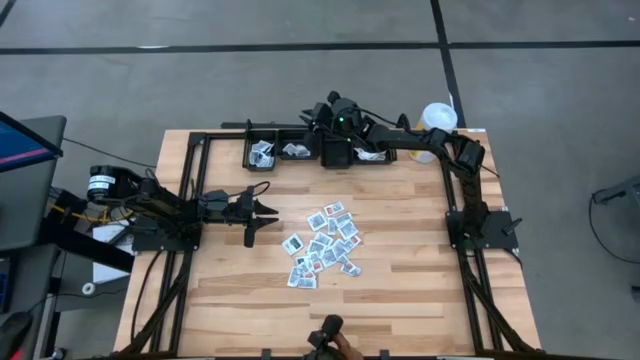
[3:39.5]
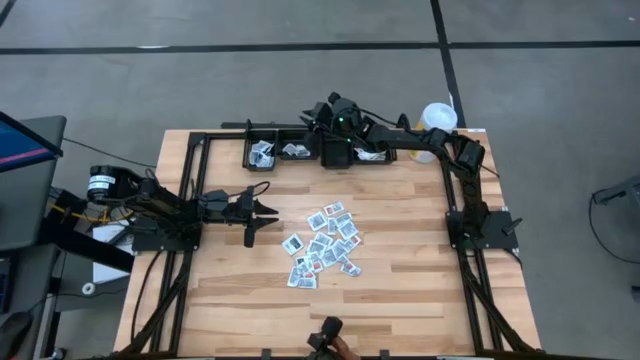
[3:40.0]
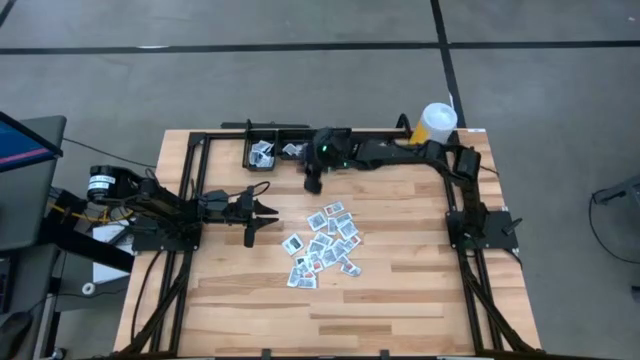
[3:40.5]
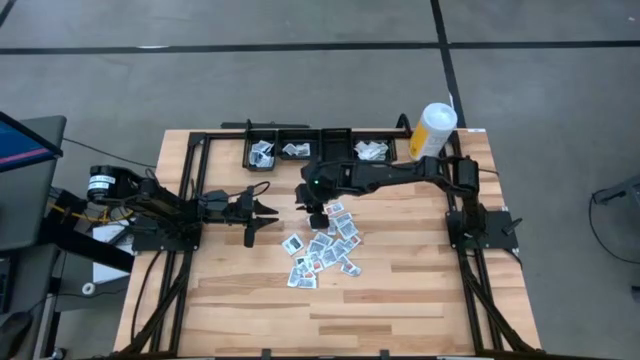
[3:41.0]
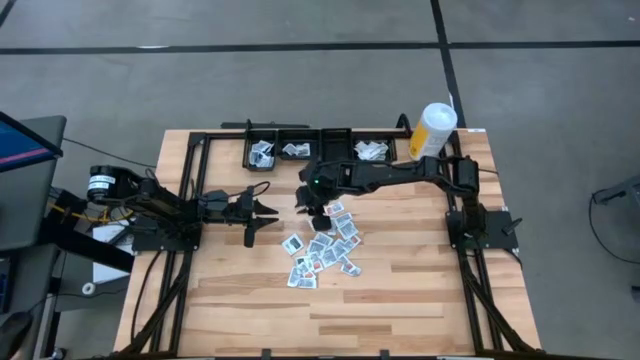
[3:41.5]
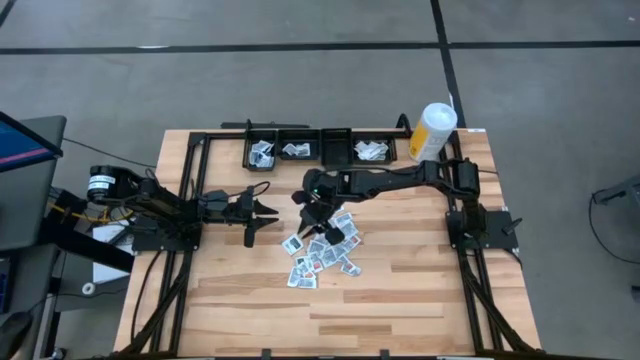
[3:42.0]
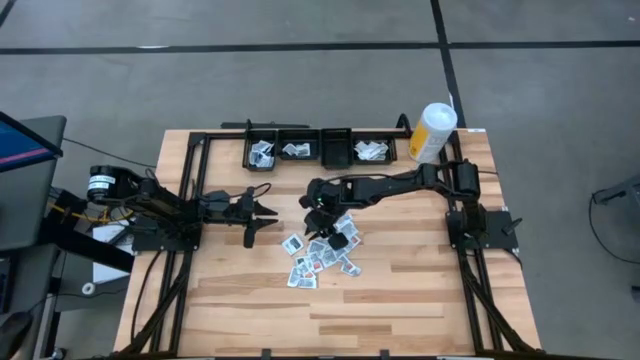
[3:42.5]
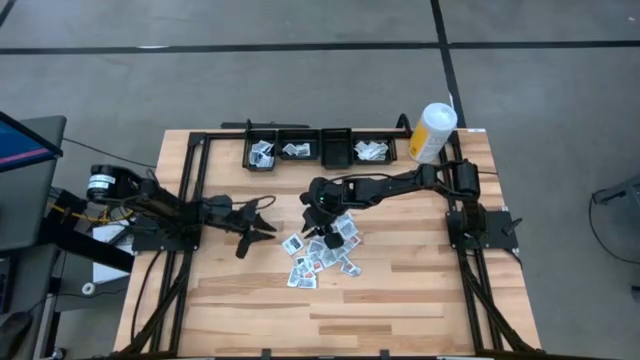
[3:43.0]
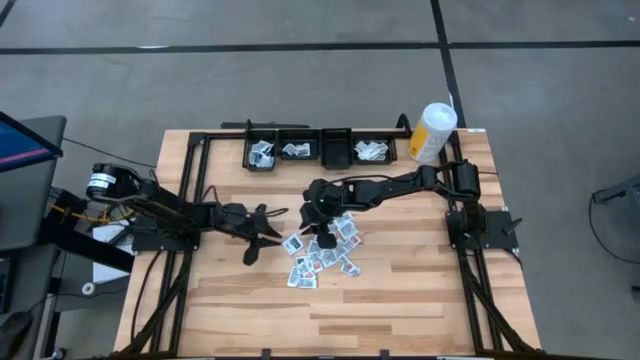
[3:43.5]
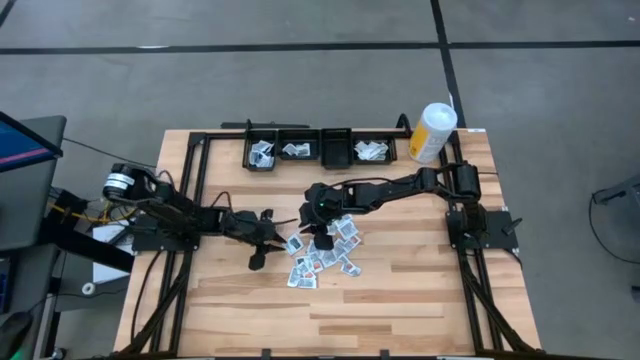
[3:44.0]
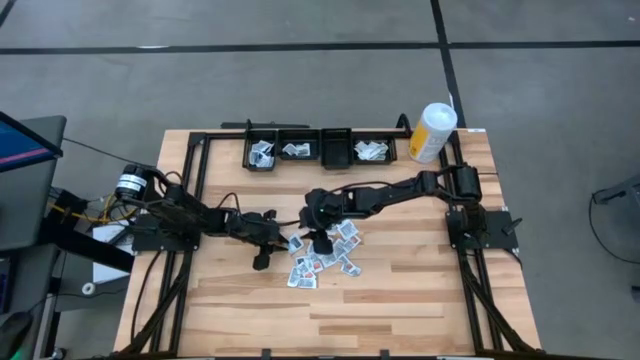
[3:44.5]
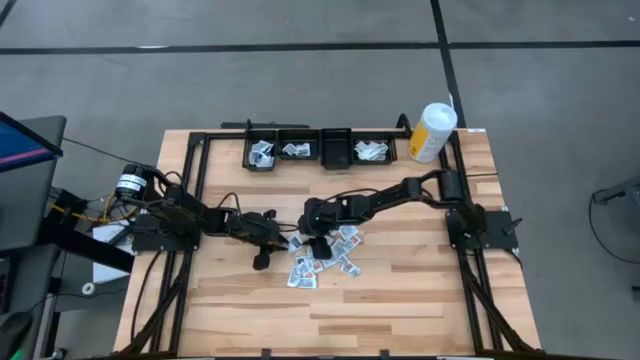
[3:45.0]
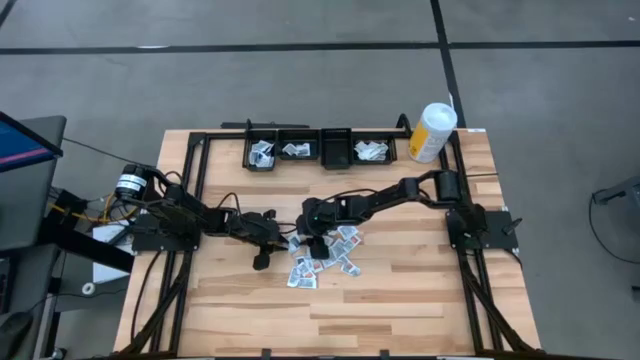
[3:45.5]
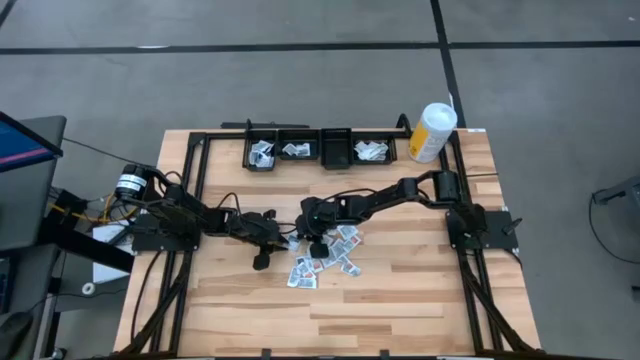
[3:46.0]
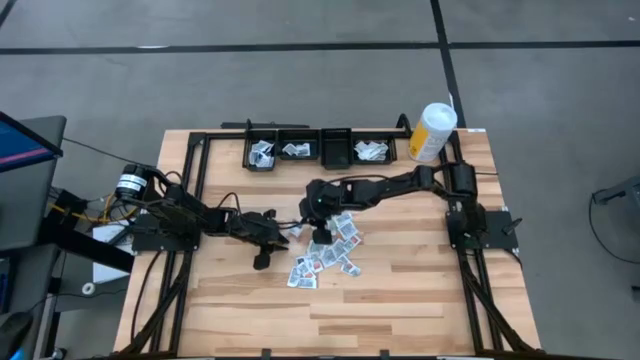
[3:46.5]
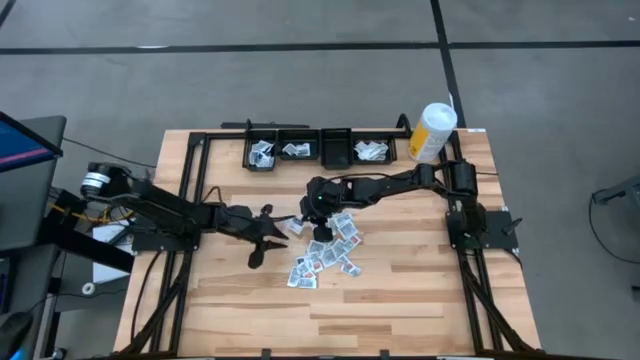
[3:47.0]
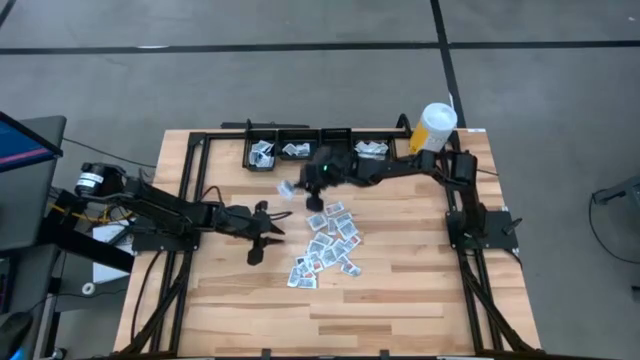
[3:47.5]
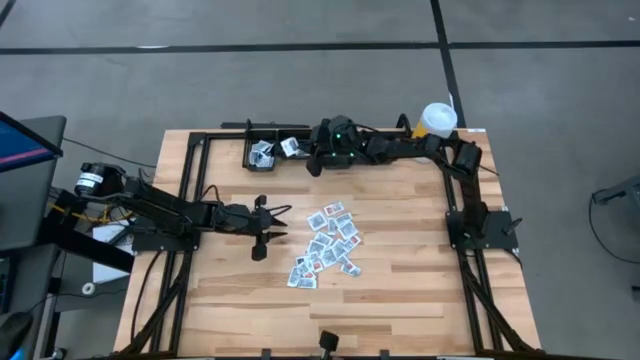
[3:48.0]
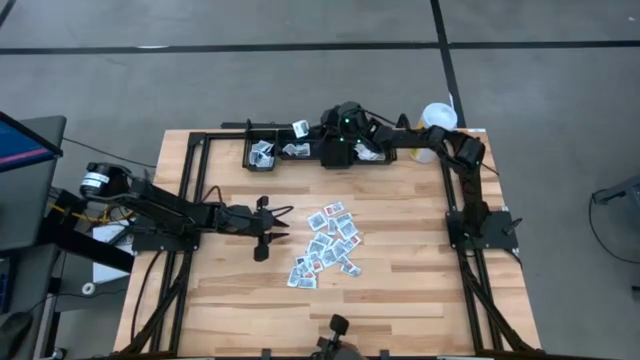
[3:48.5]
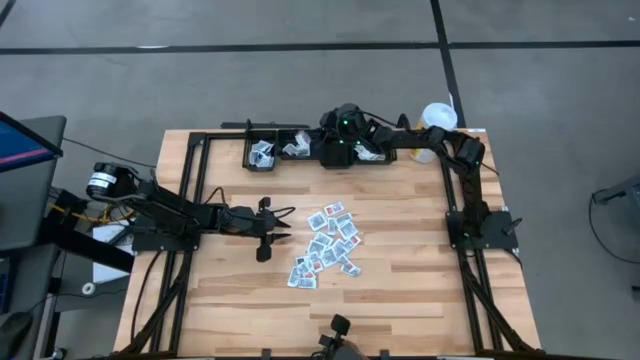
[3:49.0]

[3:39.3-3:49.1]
Task: Pick & Place First Aid Supplies
Put the black towelette pack into the middle left black bin

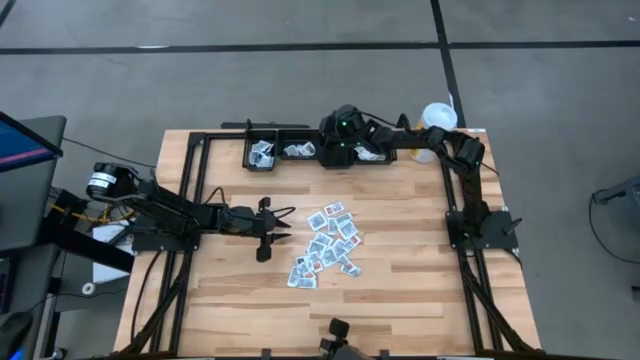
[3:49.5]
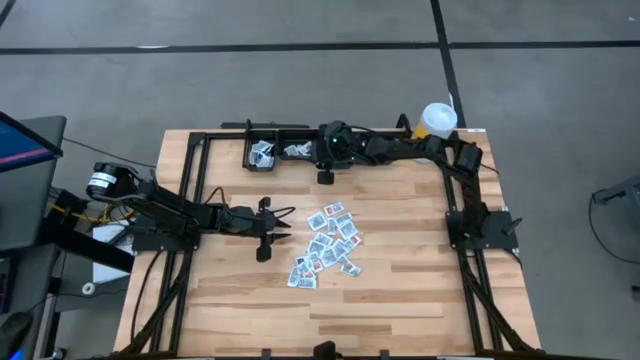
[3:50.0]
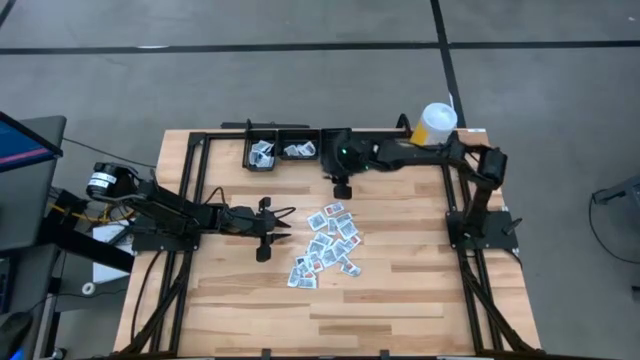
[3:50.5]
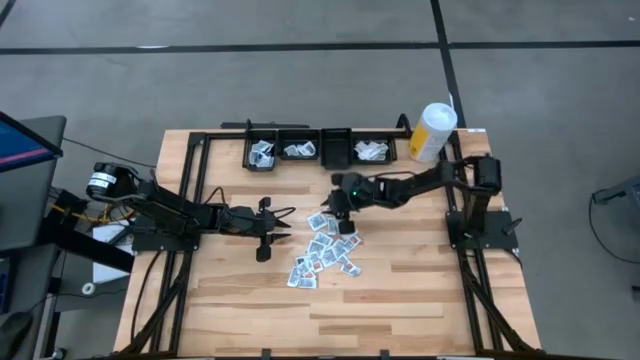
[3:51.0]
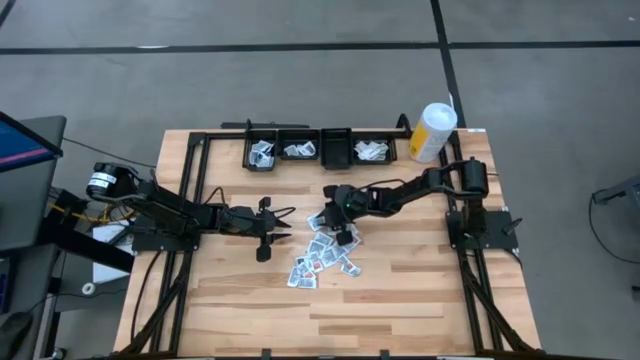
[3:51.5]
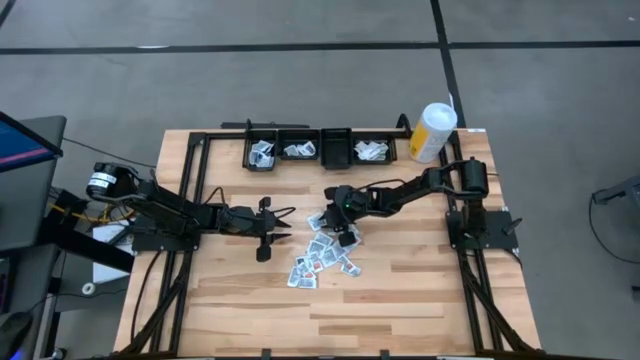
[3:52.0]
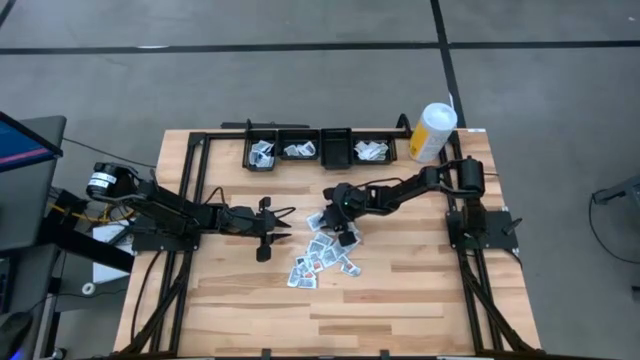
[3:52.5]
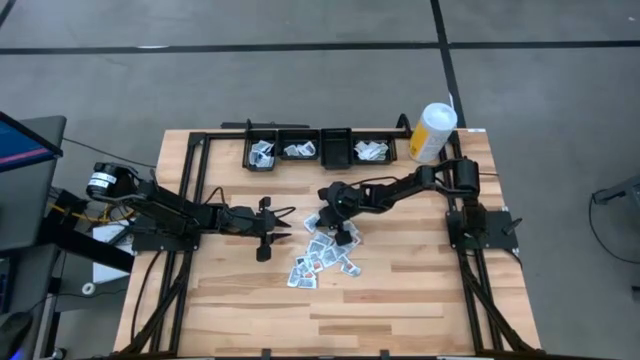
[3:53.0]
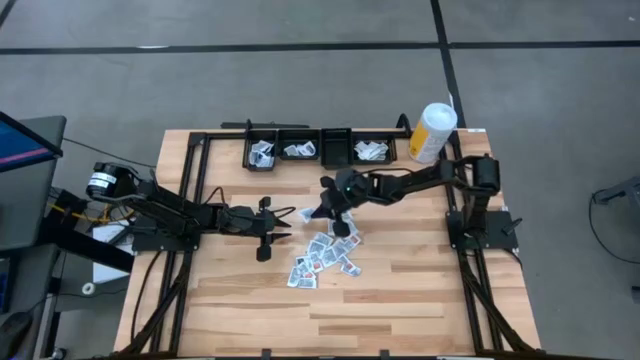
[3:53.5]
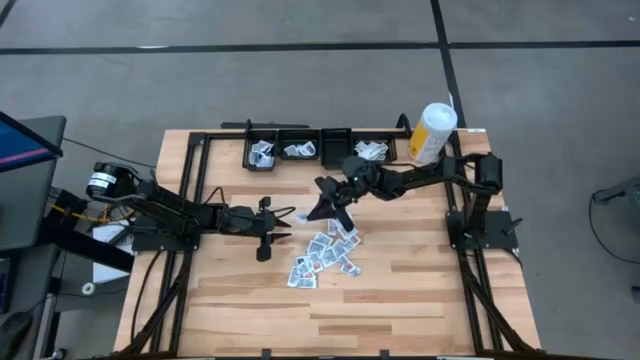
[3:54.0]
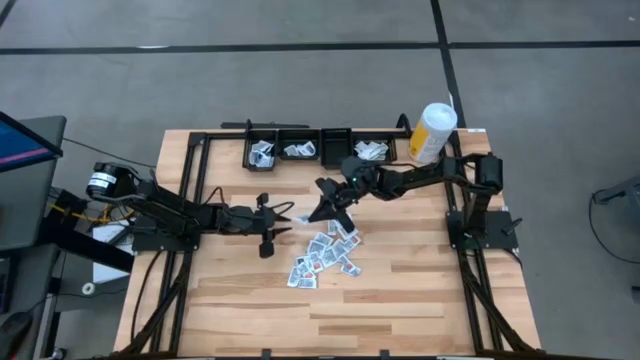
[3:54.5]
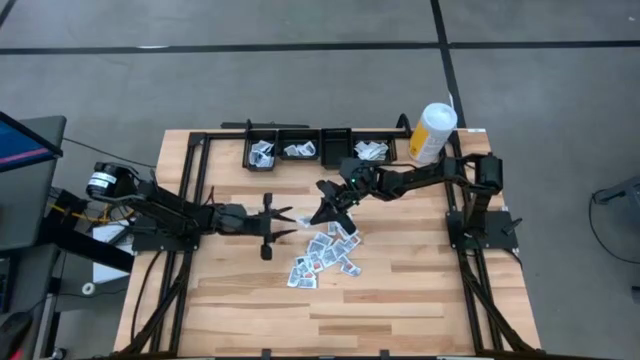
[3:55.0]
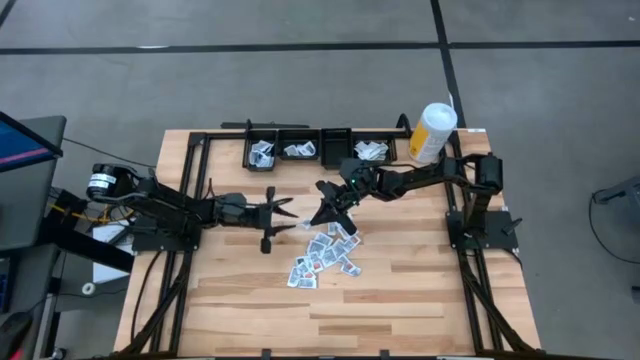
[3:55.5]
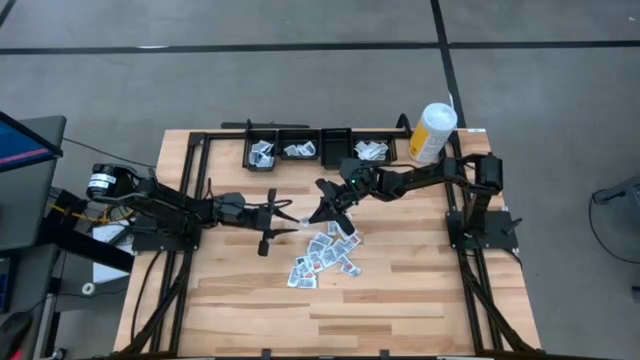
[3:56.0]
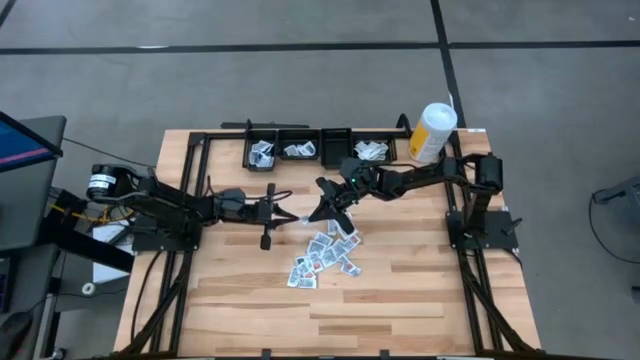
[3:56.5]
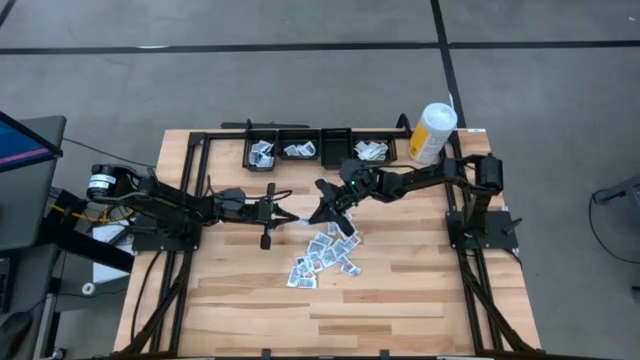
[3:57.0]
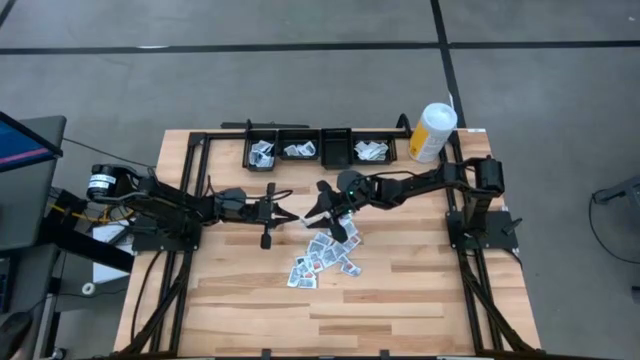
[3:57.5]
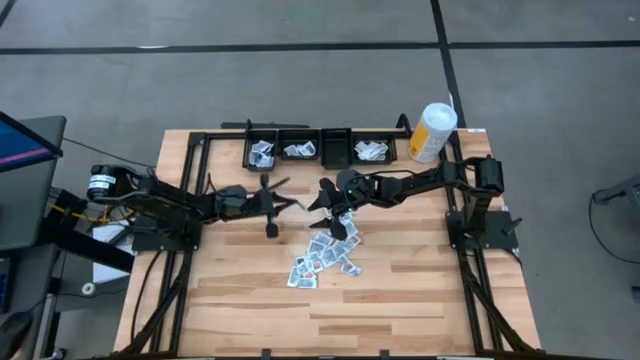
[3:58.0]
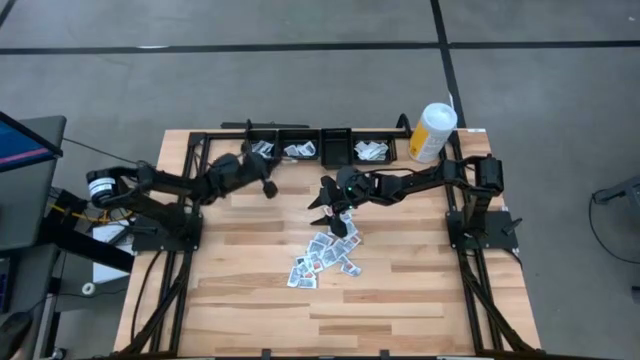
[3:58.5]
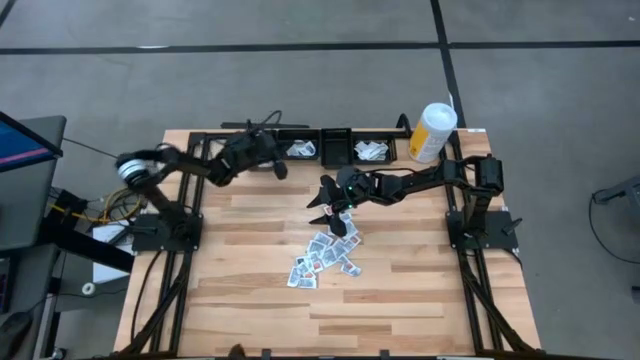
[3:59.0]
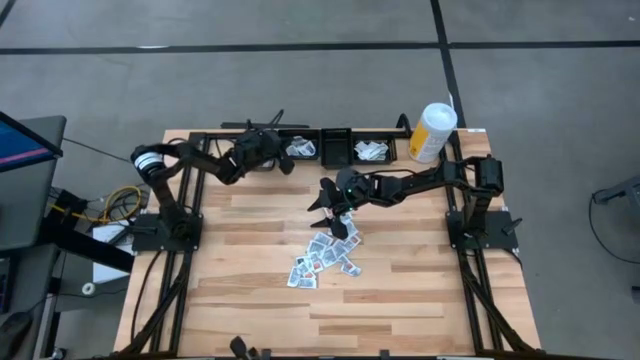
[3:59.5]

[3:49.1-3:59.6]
Put the black towelette pack into the middle left black bin
